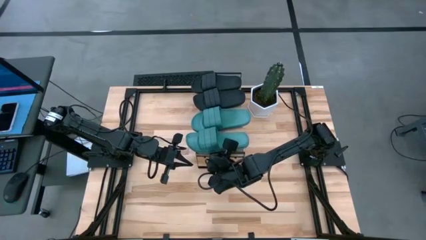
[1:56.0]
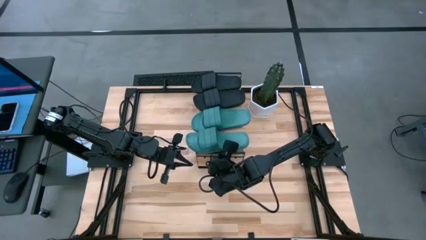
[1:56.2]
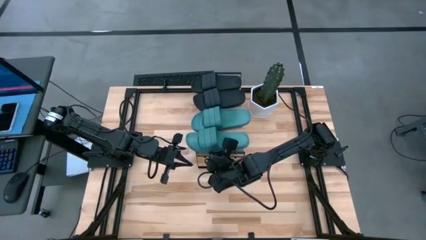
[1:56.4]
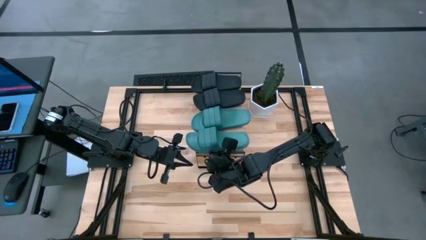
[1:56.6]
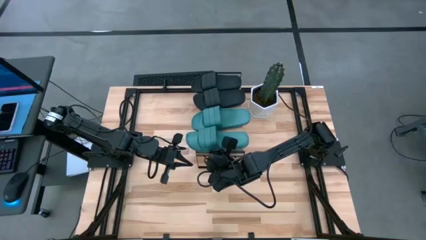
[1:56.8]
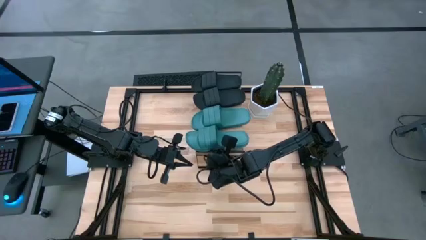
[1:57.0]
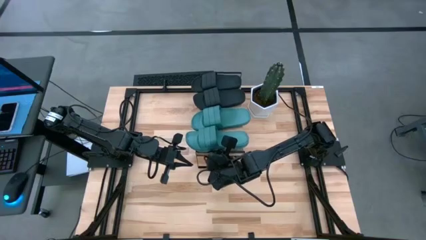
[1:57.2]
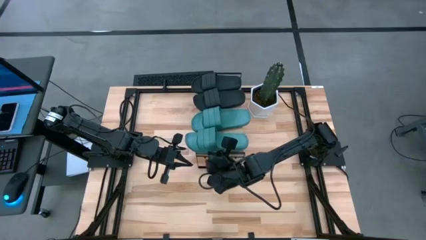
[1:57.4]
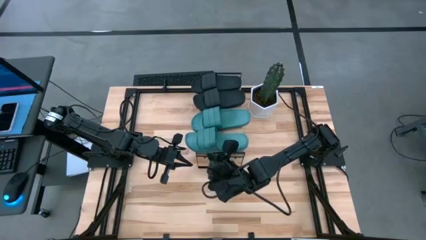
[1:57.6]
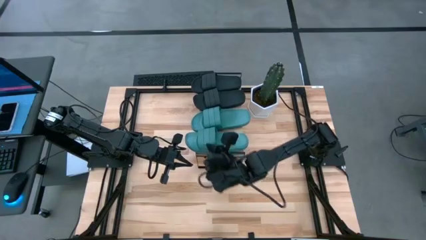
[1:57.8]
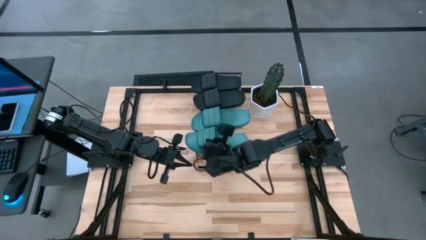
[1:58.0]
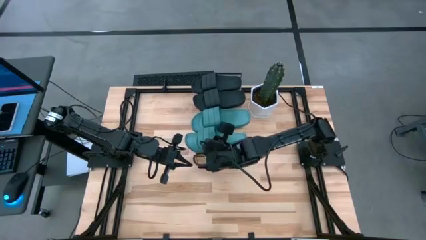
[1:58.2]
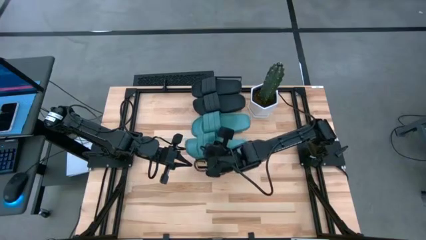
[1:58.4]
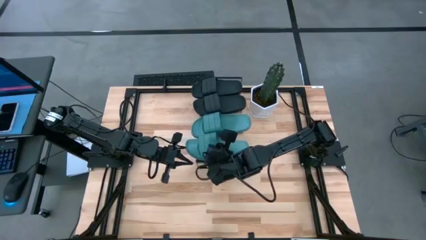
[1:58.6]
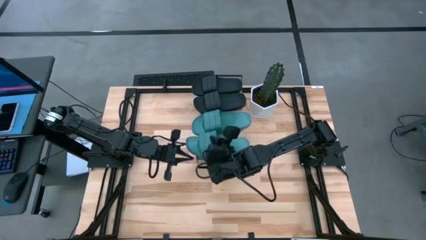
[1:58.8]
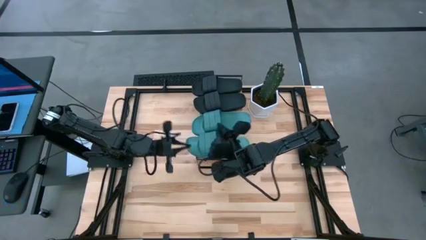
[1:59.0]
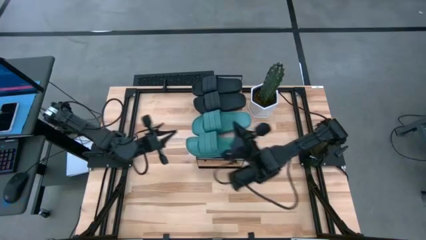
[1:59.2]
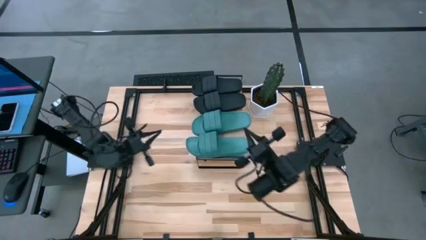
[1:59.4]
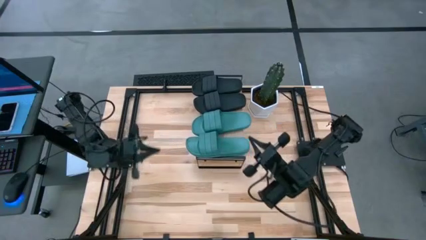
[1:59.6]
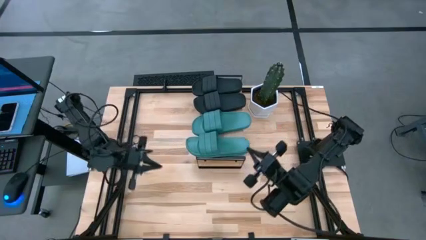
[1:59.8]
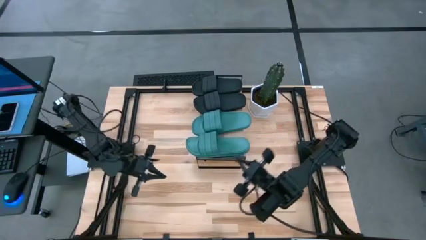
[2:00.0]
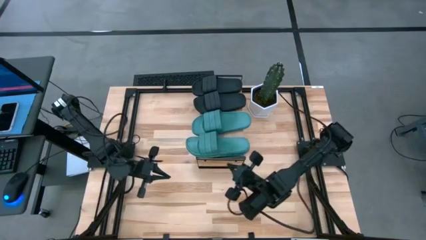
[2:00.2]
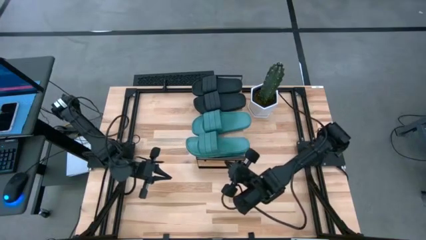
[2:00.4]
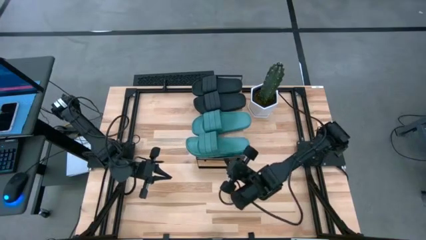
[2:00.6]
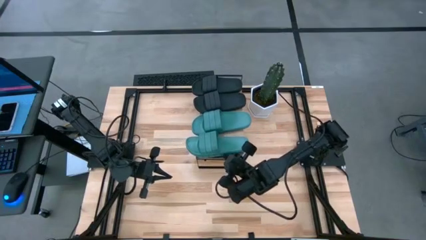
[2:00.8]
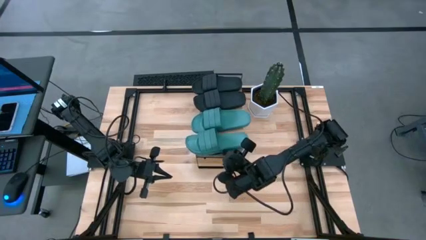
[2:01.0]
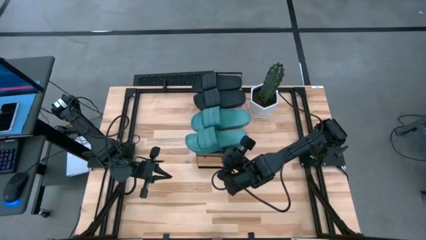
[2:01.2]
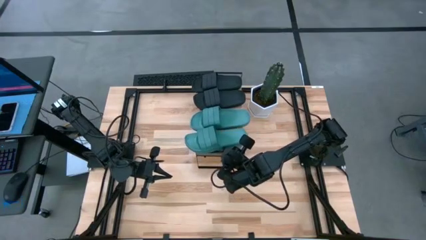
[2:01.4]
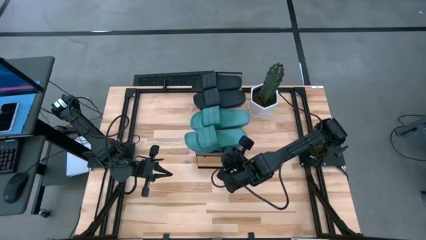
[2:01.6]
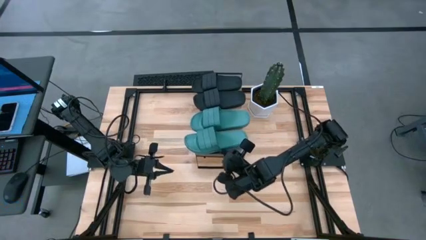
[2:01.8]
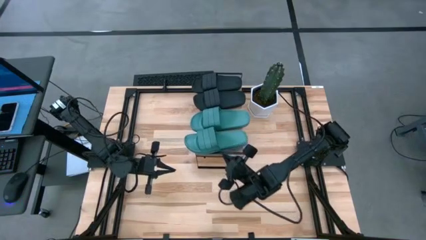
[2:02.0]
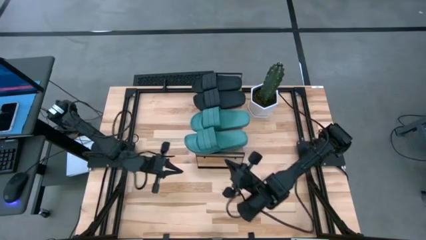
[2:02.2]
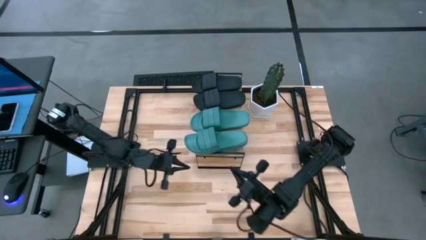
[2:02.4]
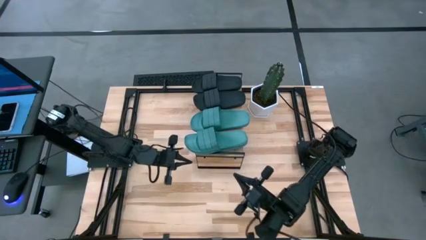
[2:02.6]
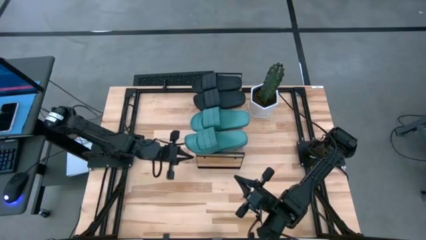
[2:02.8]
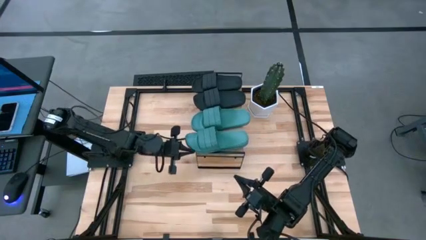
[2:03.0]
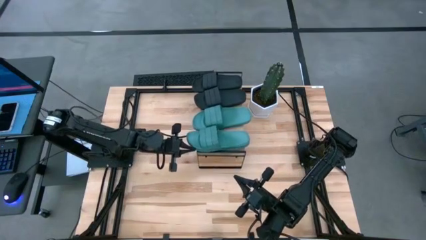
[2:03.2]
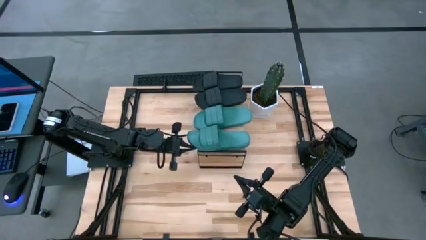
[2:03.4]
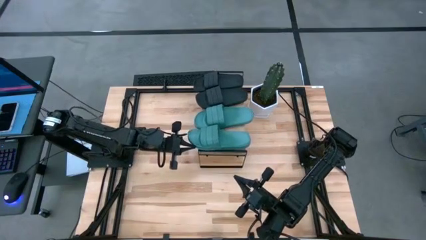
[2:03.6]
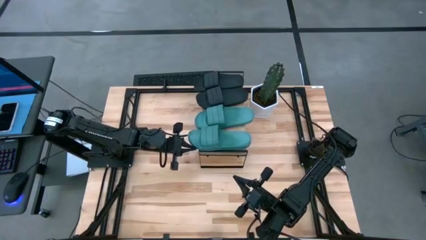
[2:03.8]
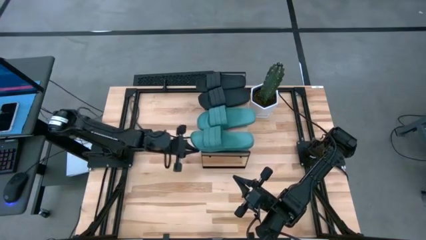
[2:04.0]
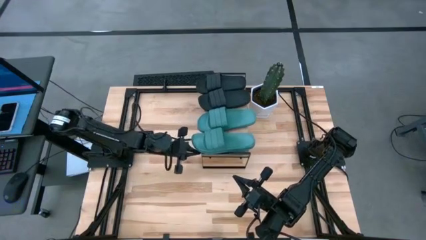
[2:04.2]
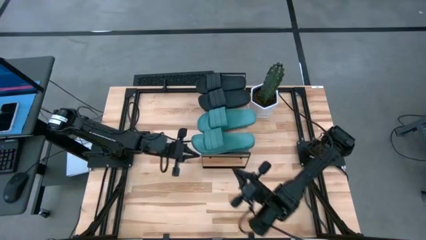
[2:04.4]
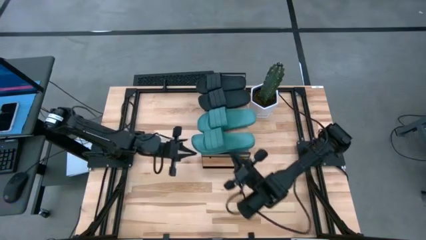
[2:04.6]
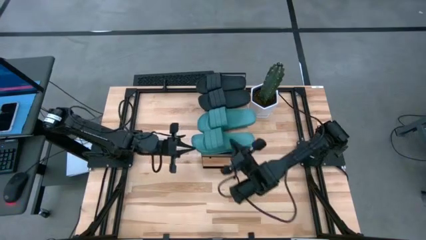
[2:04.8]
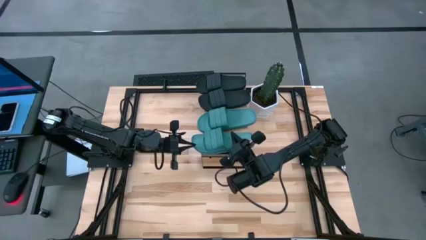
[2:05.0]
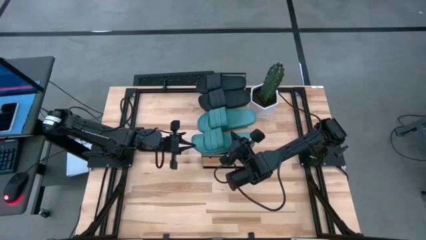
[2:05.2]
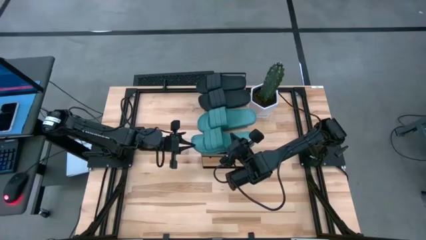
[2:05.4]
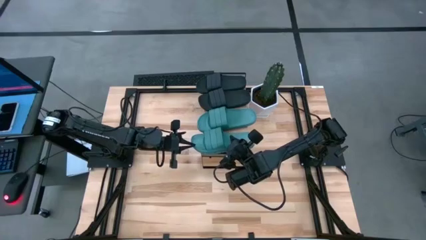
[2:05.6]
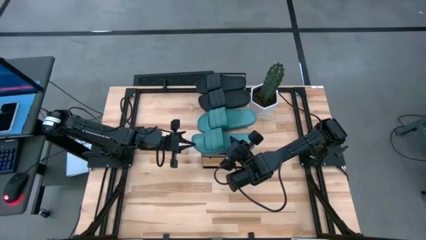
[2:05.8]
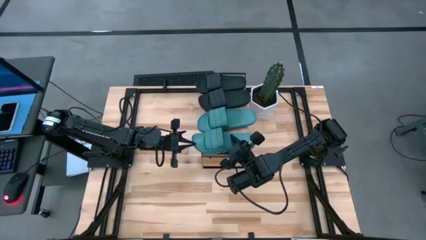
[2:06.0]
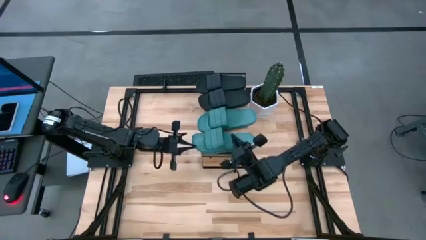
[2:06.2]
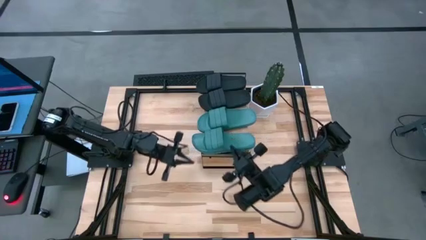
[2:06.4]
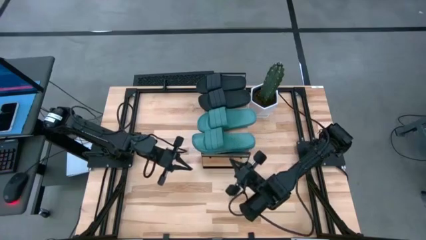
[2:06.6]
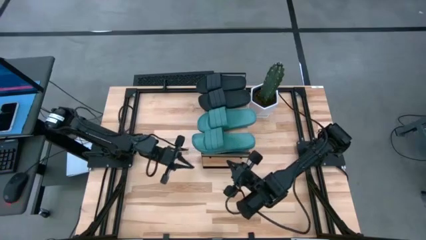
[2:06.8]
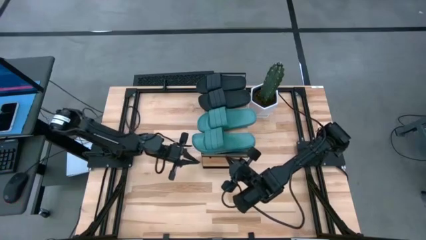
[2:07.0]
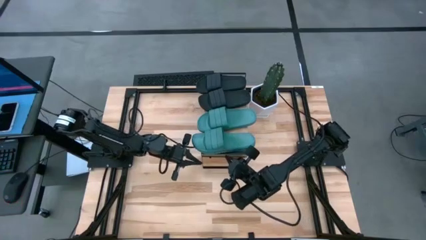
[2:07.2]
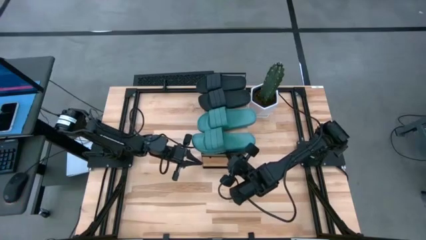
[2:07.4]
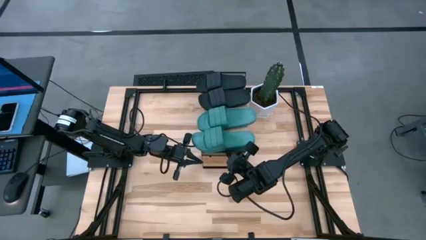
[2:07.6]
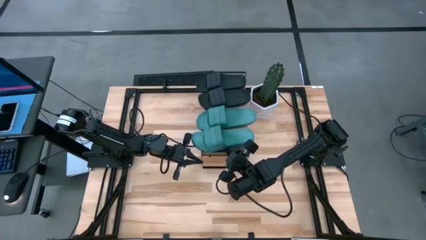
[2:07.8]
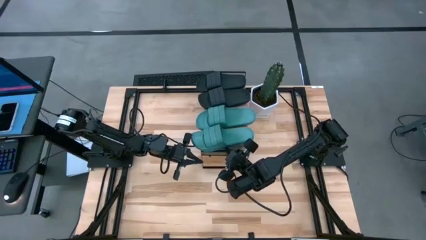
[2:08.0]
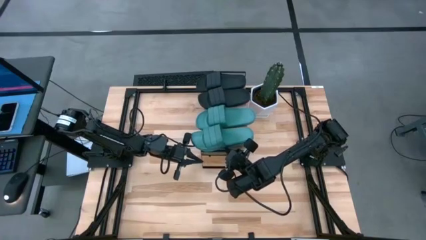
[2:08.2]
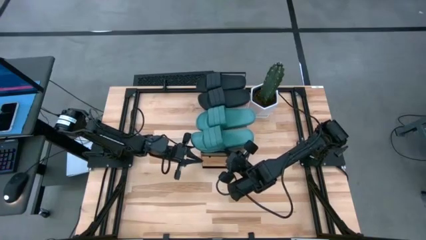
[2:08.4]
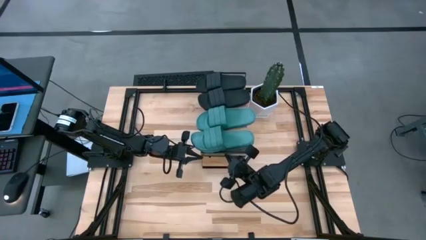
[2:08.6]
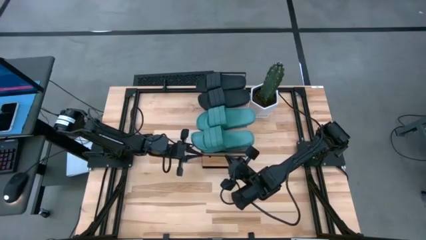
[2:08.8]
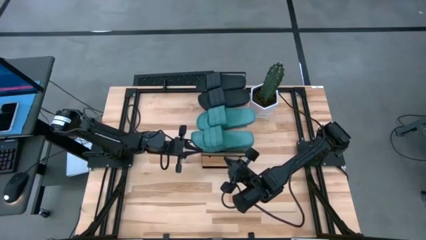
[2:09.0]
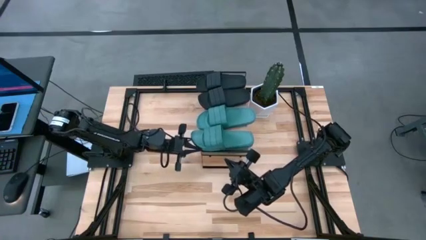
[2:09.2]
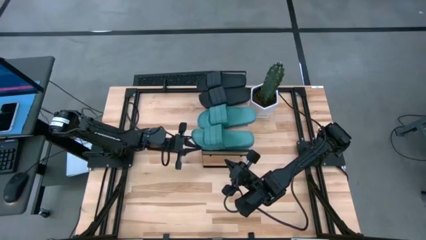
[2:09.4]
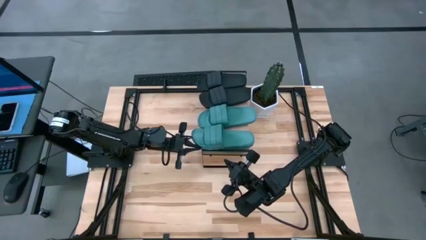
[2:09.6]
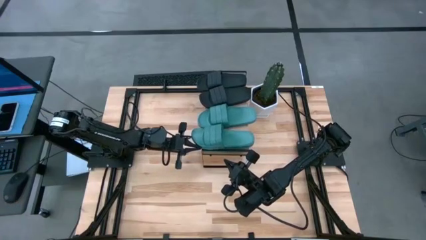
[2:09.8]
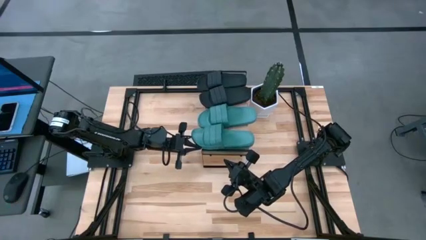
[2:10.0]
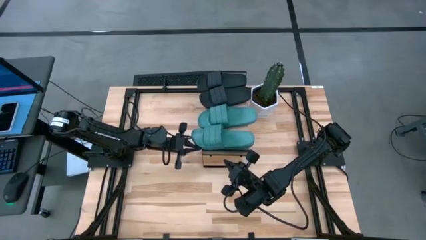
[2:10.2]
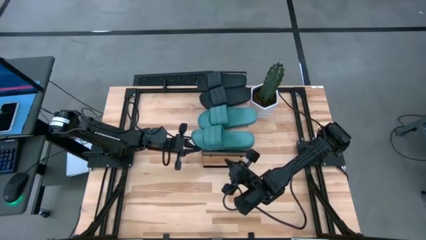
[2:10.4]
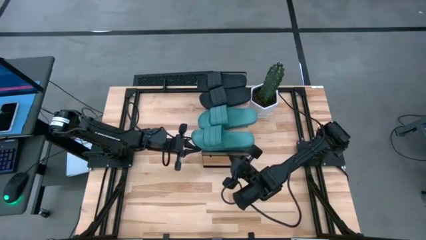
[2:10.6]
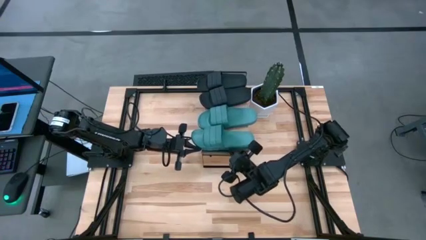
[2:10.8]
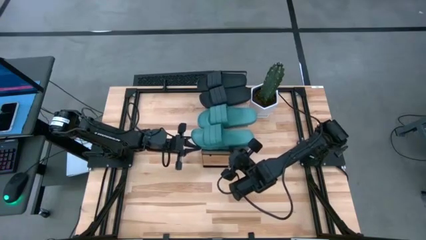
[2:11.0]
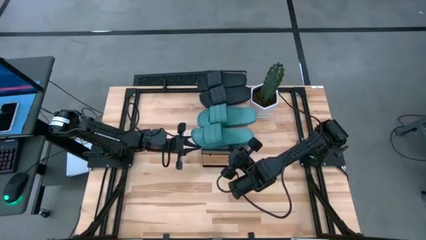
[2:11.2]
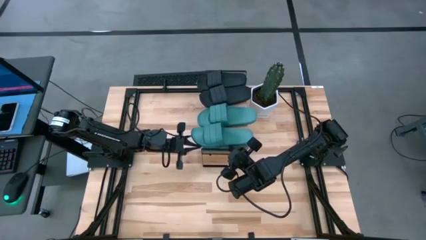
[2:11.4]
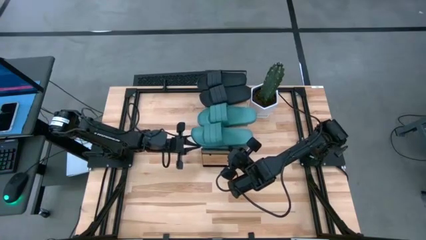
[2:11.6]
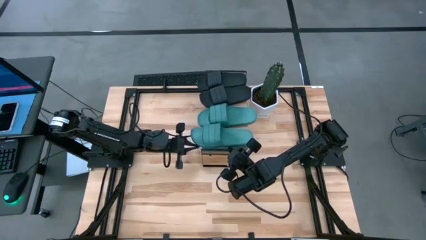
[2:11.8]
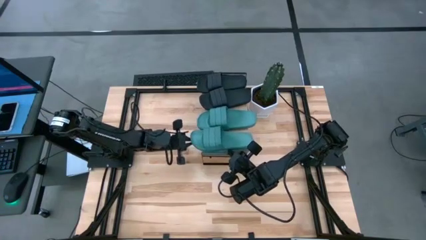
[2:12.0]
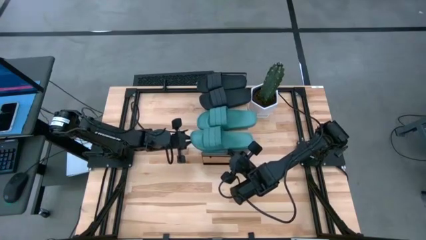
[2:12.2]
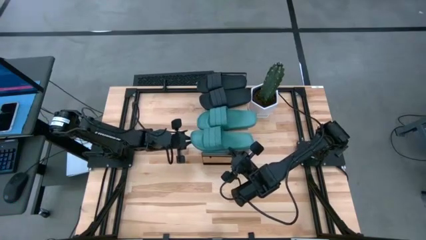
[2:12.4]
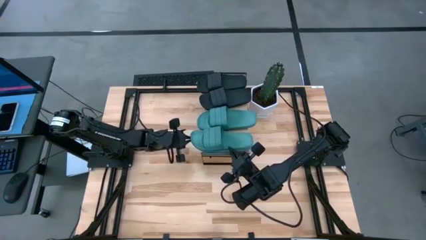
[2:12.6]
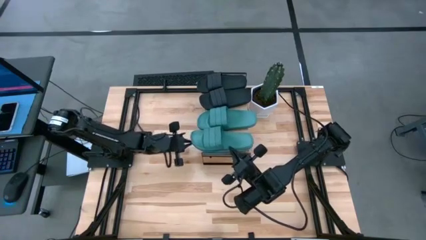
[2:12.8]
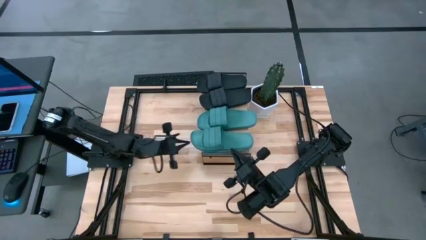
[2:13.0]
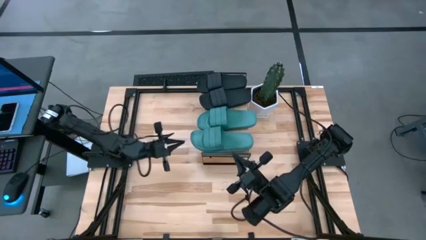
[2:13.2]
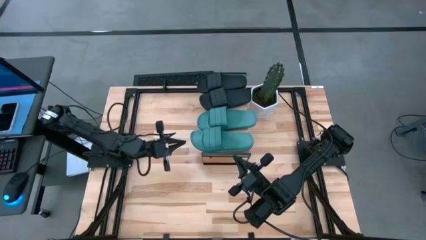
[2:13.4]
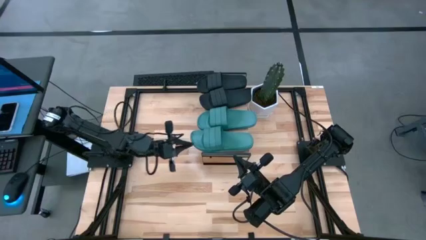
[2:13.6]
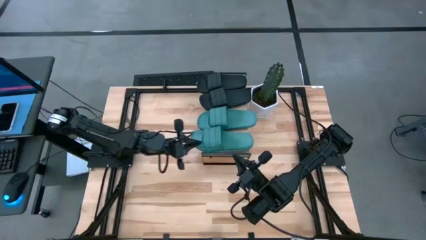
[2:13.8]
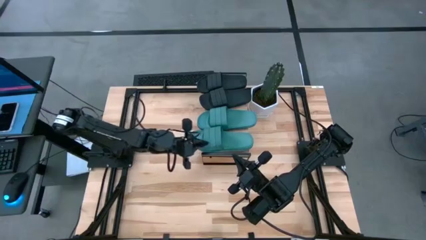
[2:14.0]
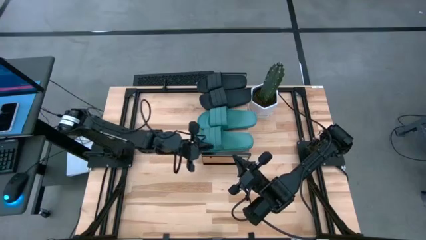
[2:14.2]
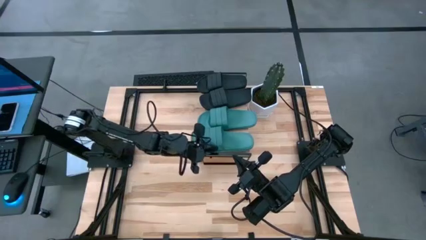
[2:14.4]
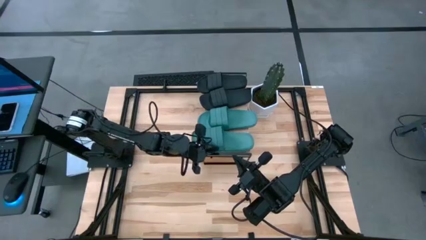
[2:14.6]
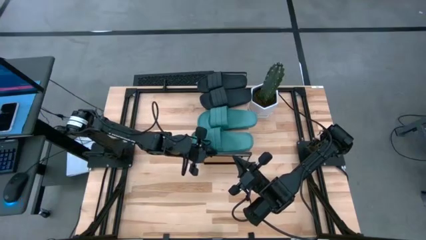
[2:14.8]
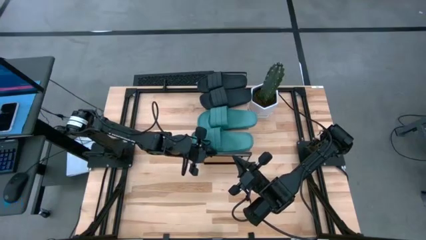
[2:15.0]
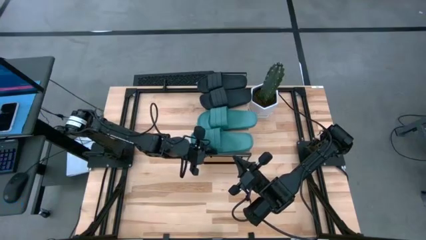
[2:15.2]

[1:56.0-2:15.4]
Task: Pick and place slides into the shelf
Adjust the black and green slippers
